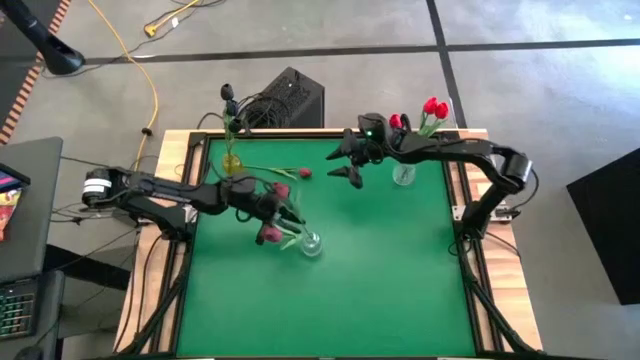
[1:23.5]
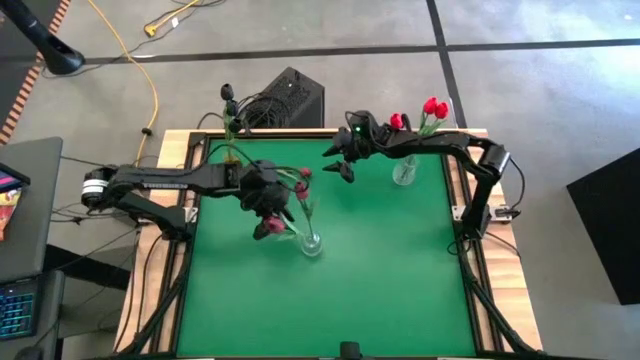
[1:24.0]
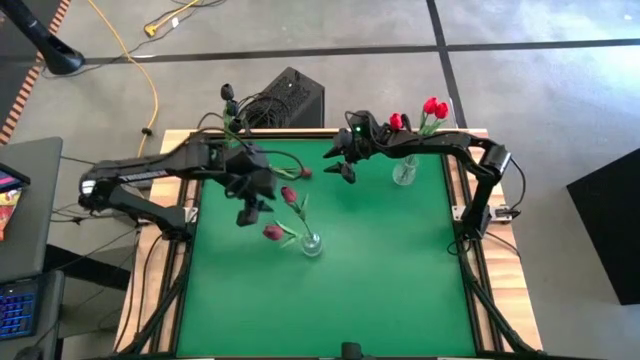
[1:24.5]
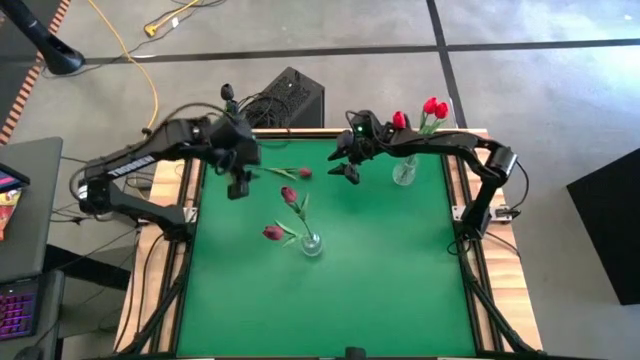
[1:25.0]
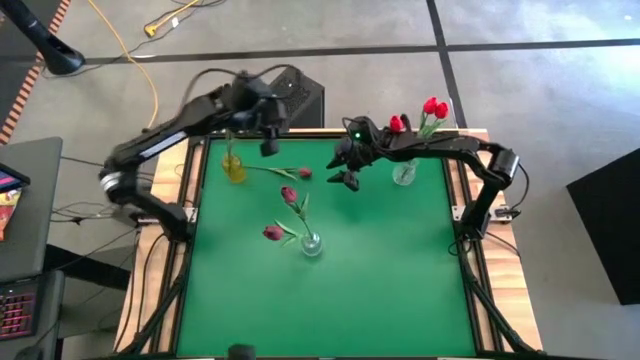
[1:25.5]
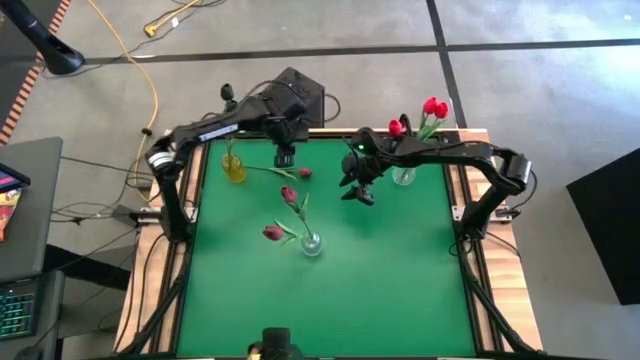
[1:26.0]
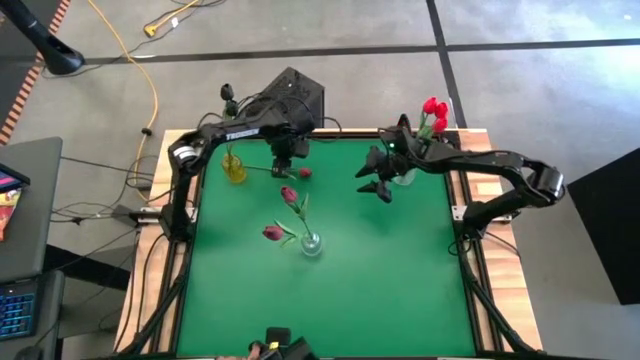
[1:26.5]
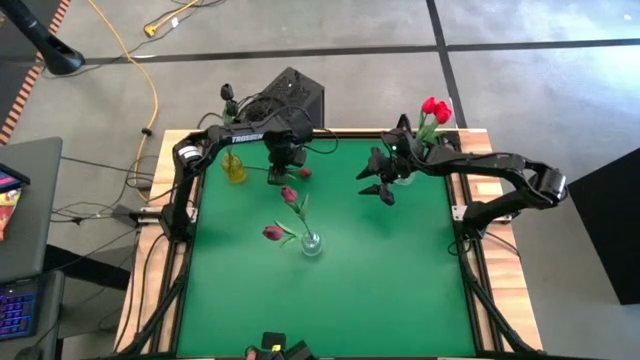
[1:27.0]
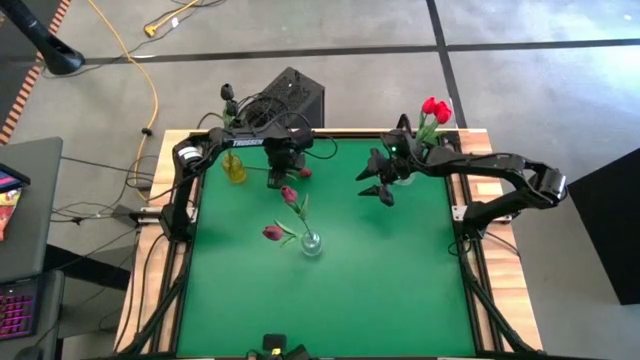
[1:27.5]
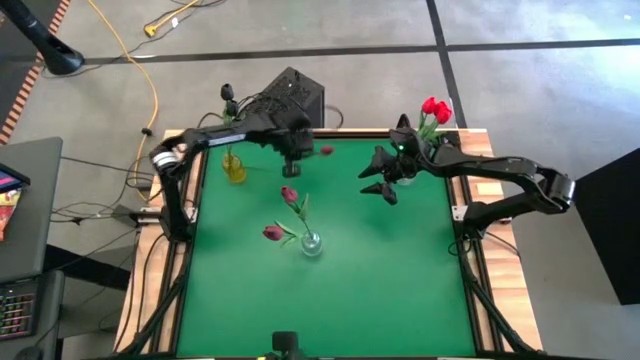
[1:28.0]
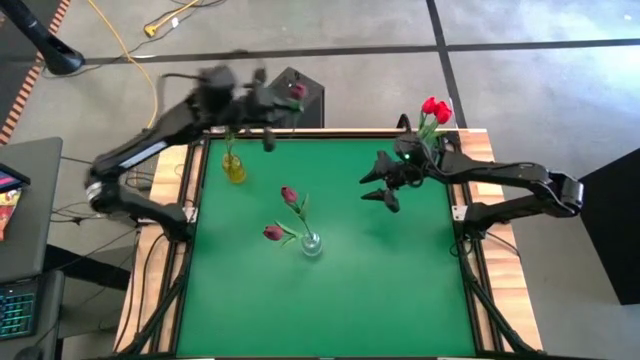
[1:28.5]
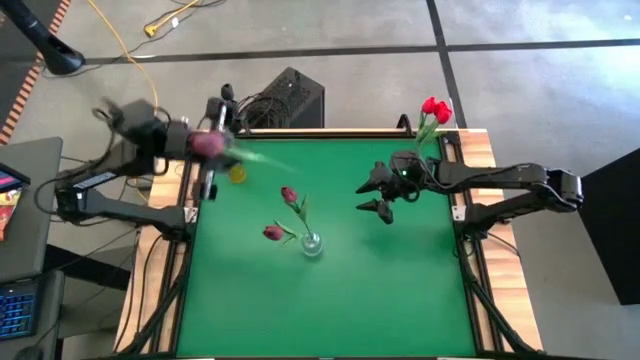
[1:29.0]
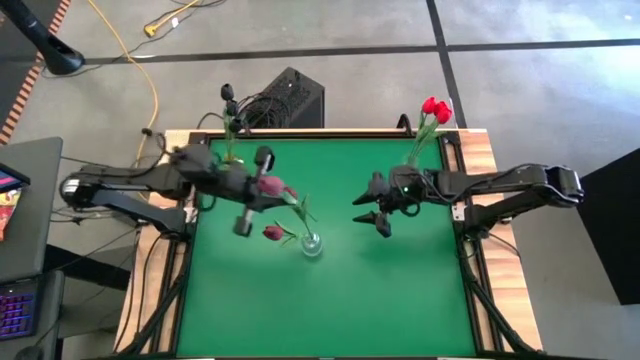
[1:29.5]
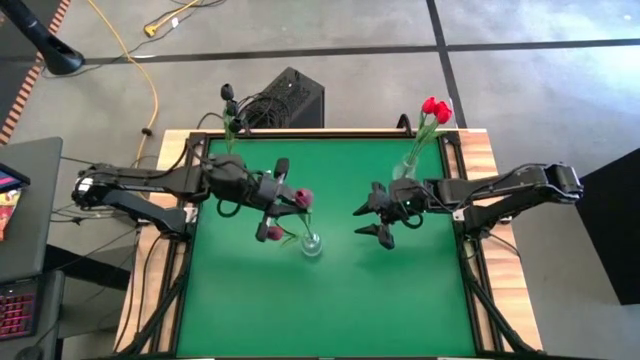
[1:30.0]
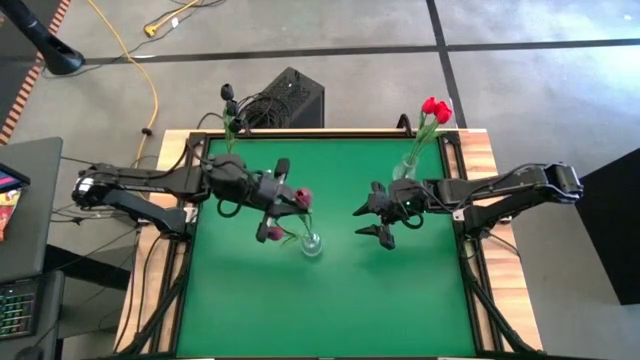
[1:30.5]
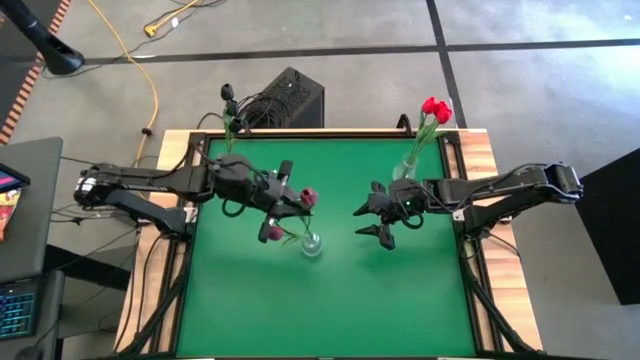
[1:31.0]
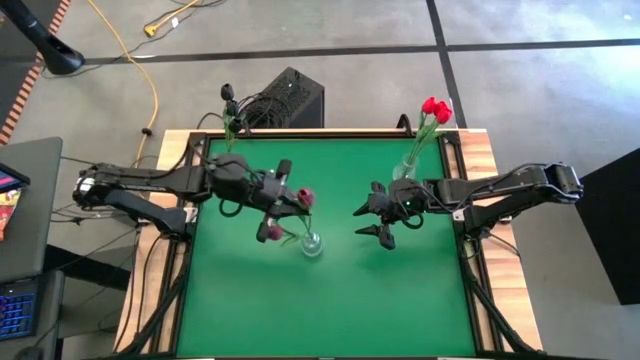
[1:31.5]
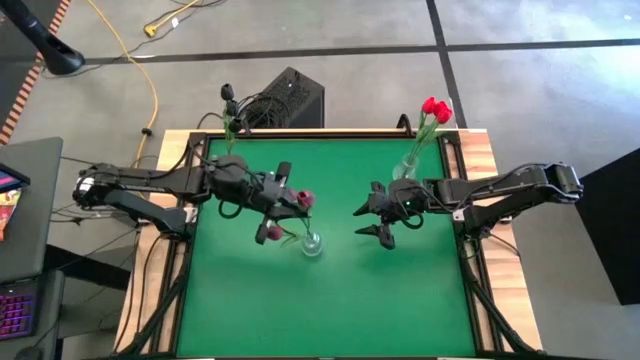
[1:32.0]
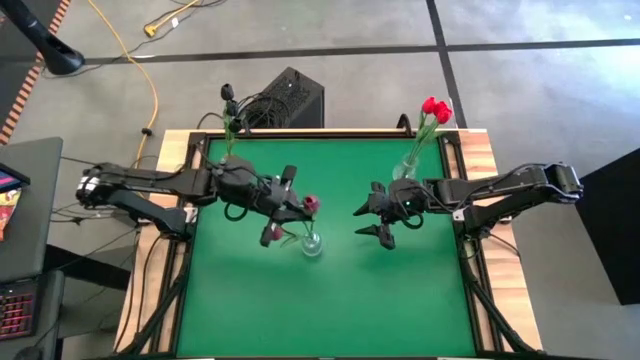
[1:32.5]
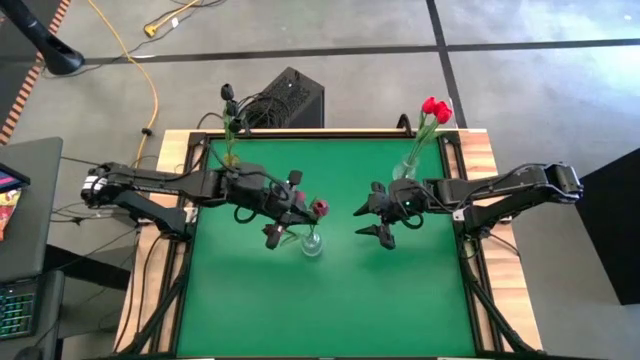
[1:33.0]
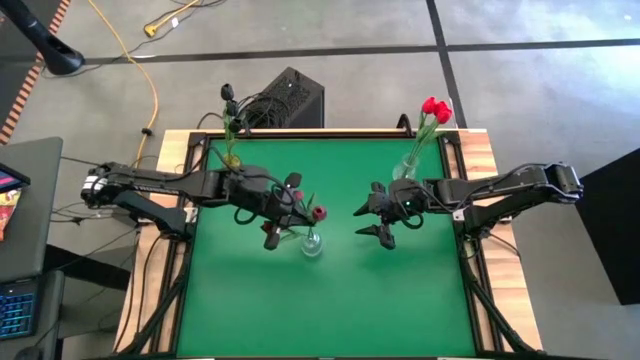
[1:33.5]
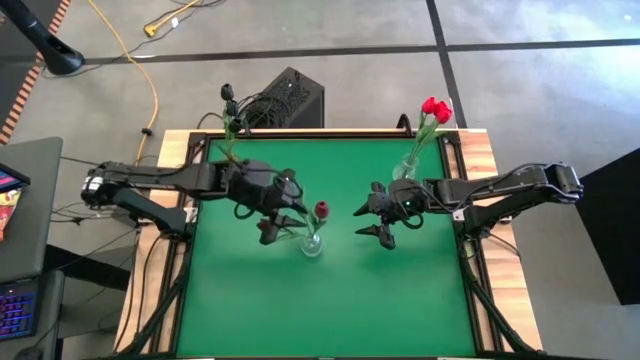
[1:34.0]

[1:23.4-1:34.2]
Task: Sort flowers into vase by color
Put the dark red tulip into the bottom transparent vase

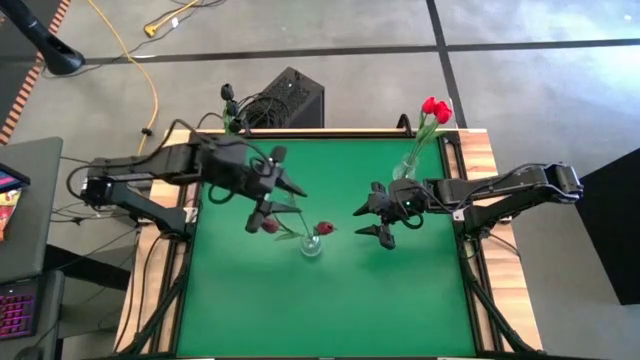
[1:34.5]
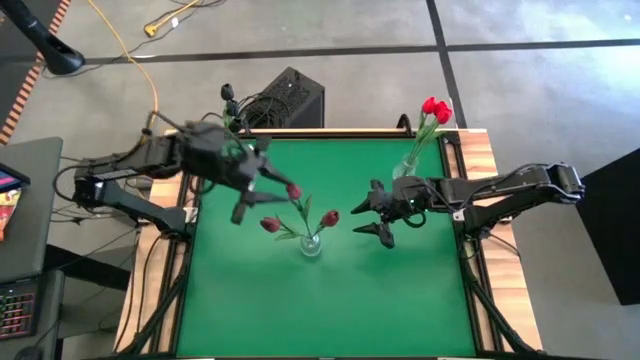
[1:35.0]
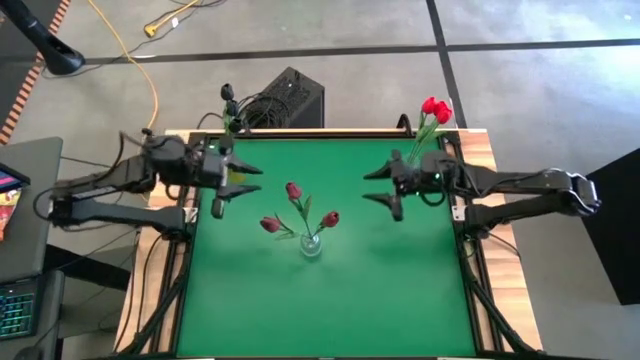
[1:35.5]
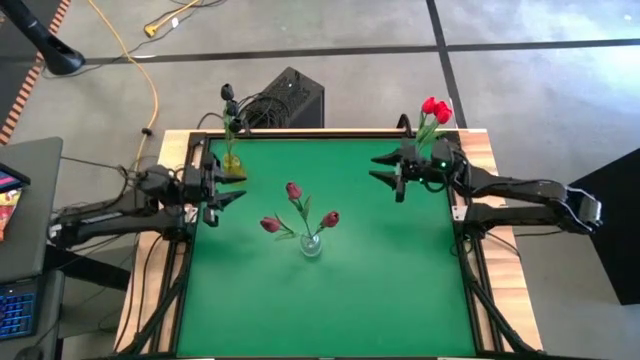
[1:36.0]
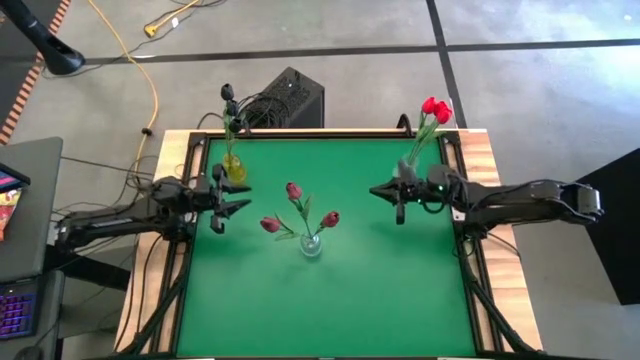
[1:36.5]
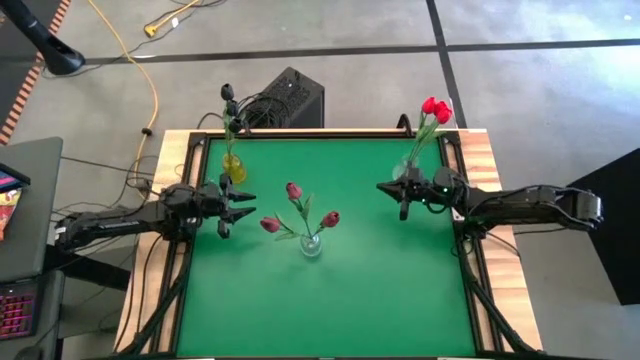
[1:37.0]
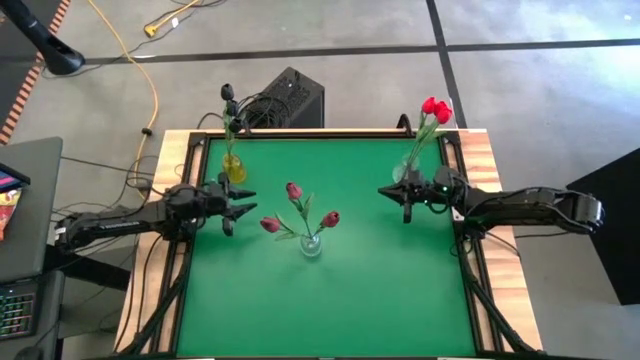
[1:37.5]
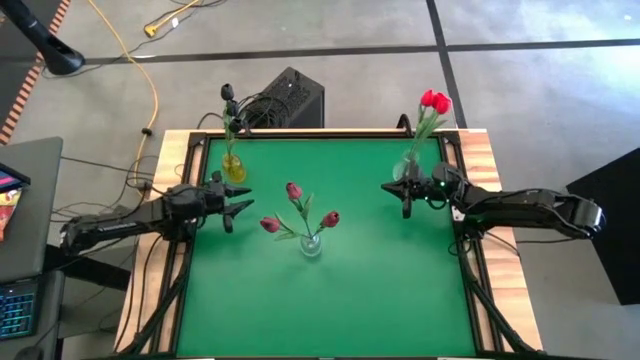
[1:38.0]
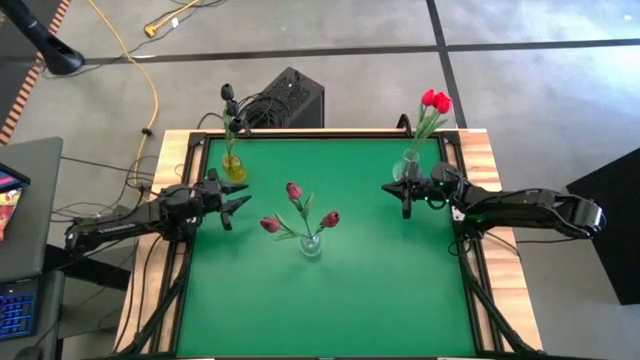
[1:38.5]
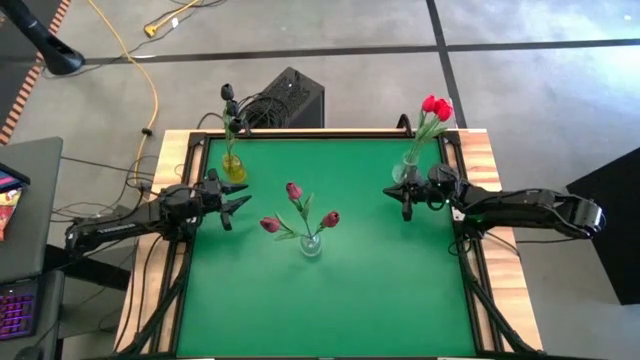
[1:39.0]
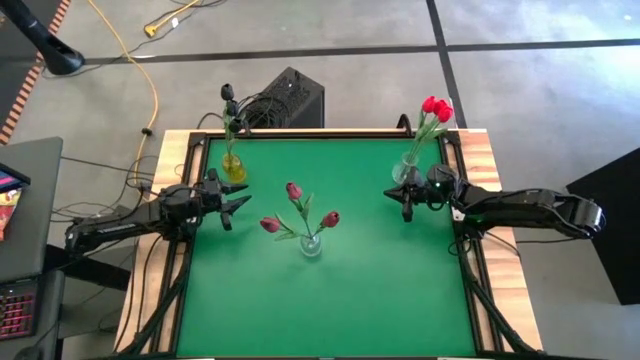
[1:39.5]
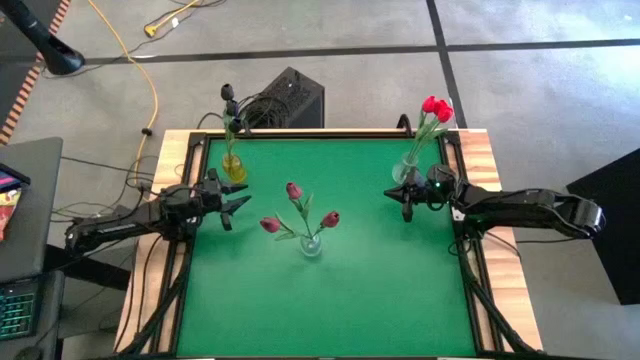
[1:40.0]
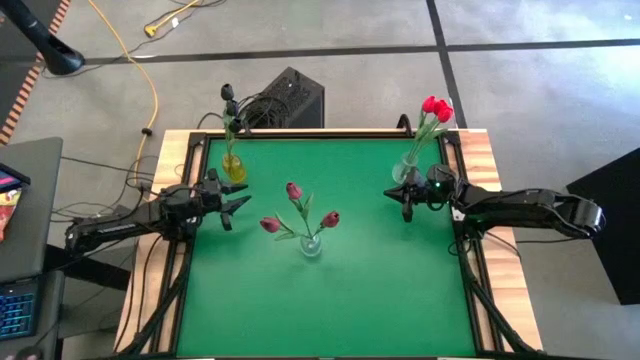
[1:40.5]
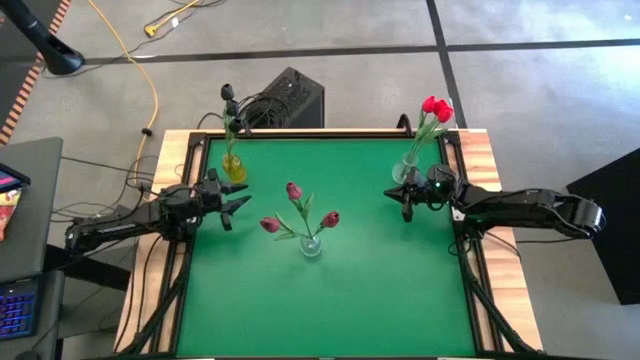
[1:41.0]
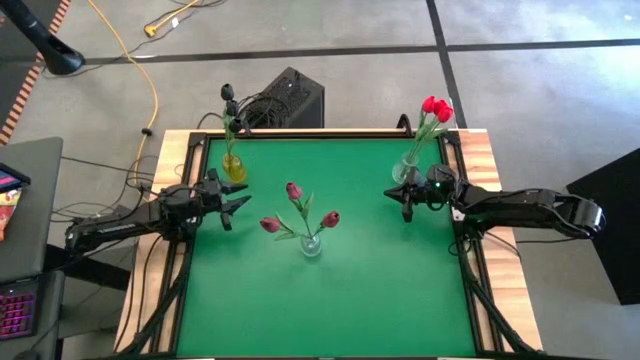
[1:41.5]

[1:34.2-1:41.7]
Return to Home Position

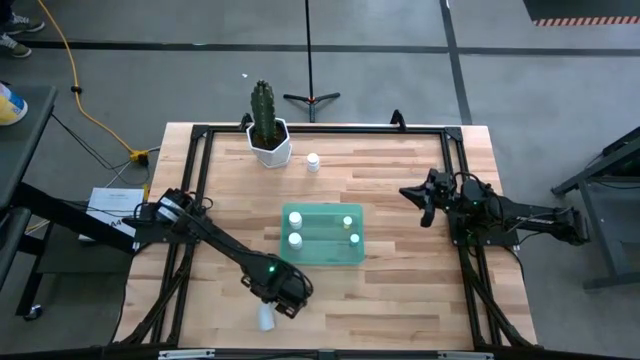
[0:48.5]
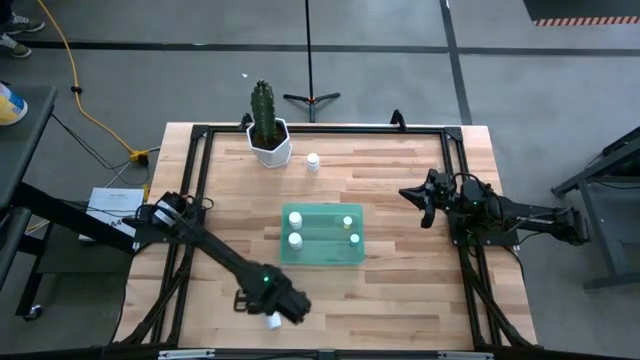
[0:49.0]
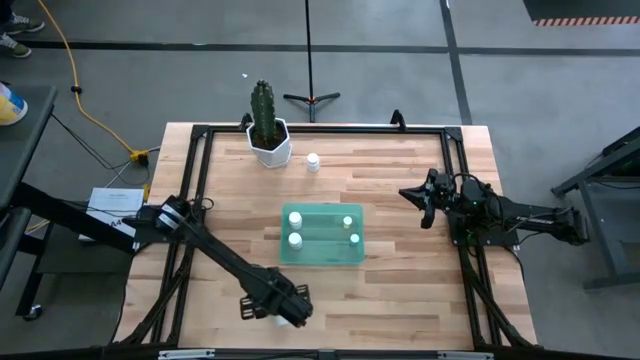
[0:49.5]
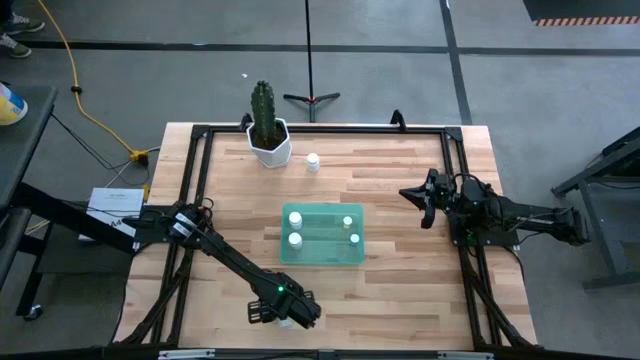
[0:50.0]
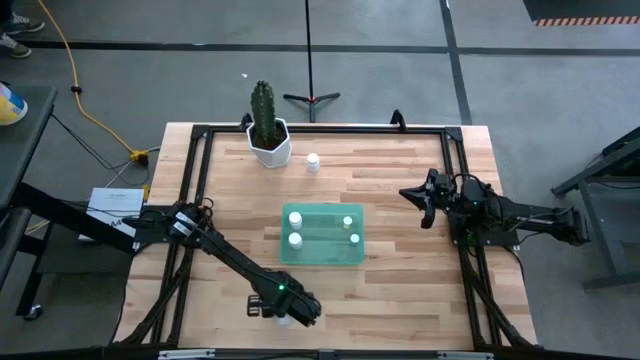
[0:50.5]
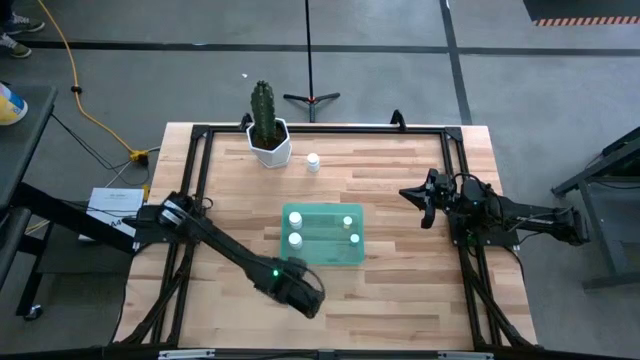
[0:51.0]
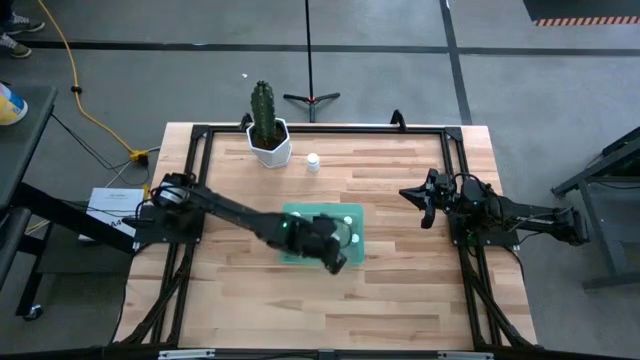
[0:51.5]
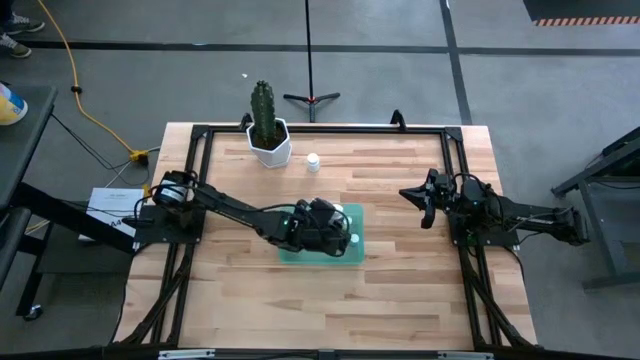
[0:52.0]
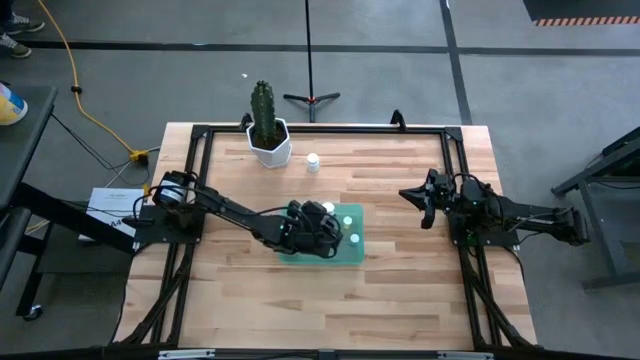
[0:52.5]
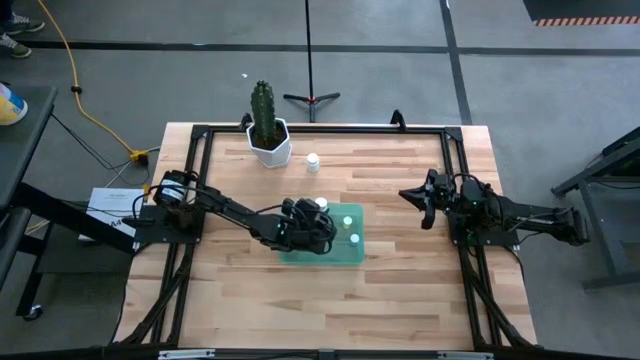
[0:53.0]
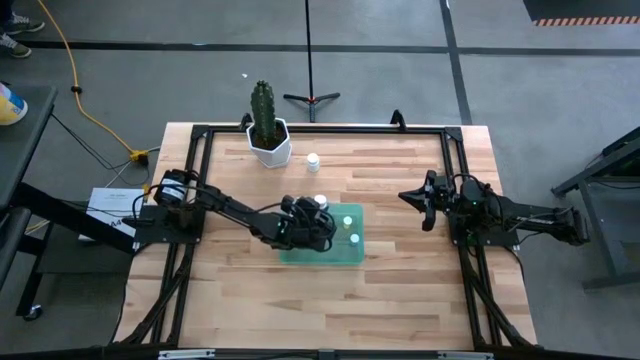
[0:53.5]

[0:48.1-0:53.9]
Task: Pick and place pill bottles into a basket
Put the bottom white pill bottle into the blue bin
